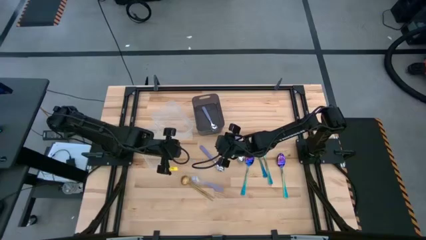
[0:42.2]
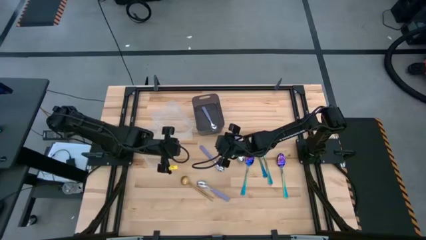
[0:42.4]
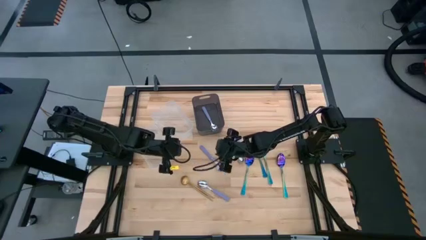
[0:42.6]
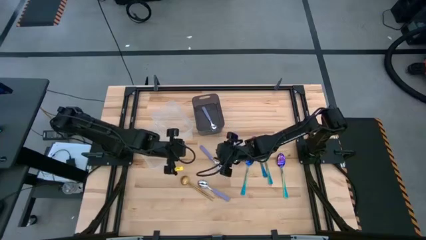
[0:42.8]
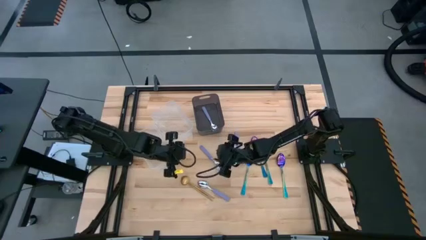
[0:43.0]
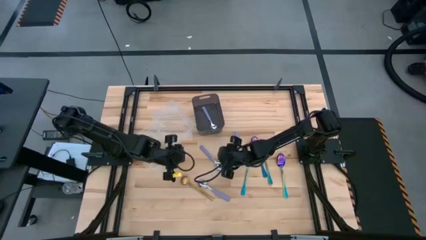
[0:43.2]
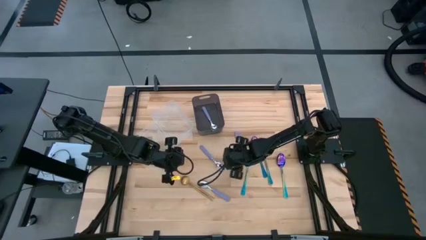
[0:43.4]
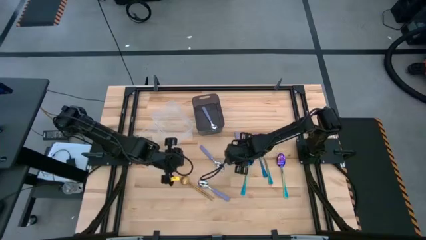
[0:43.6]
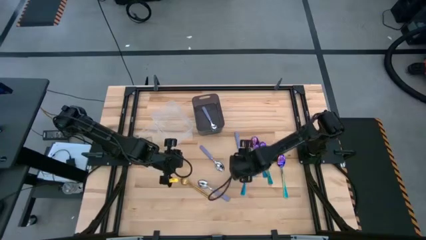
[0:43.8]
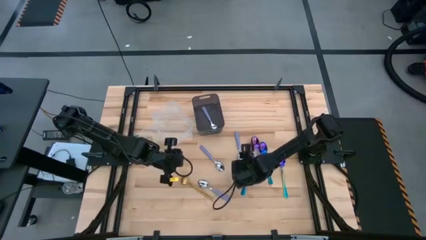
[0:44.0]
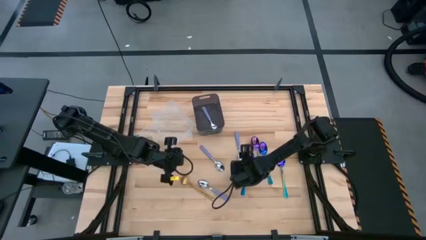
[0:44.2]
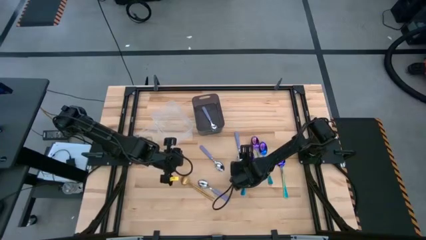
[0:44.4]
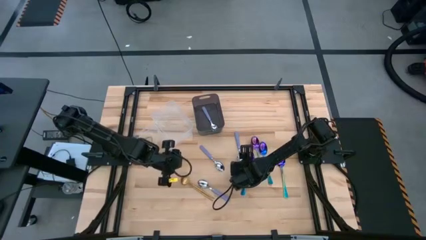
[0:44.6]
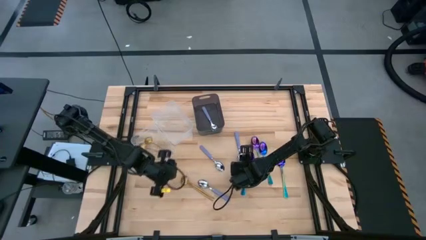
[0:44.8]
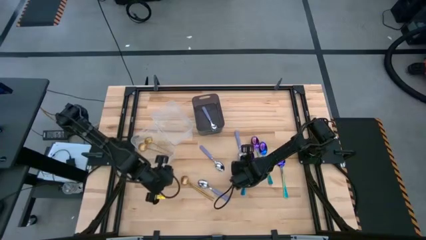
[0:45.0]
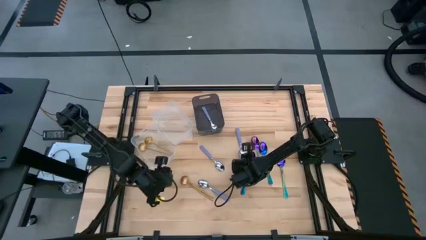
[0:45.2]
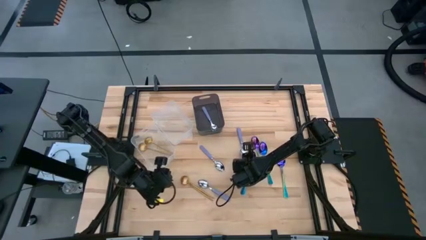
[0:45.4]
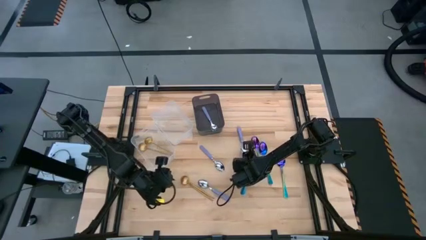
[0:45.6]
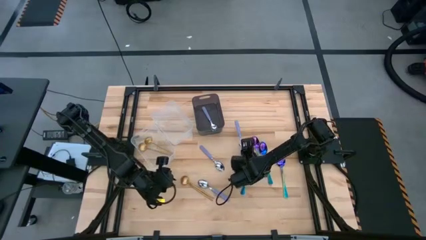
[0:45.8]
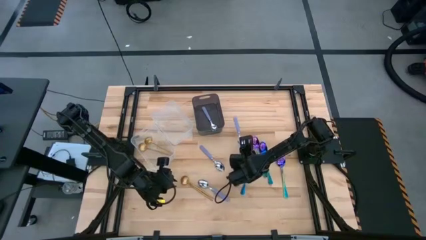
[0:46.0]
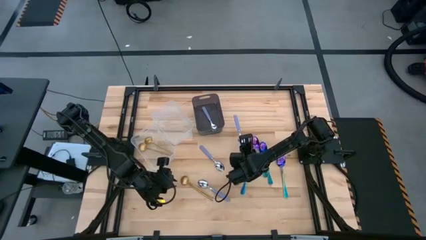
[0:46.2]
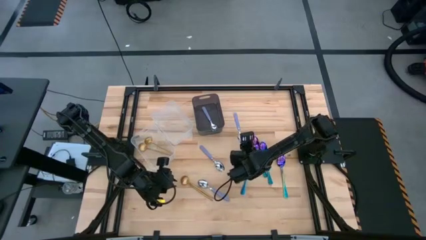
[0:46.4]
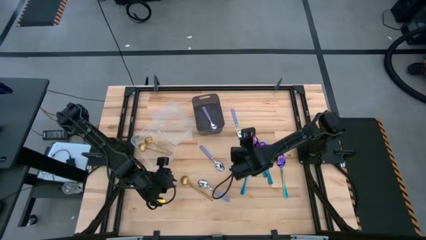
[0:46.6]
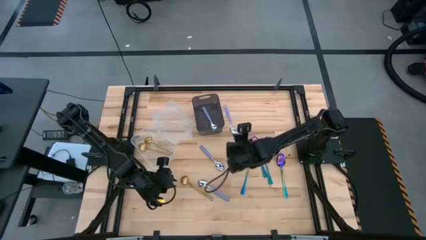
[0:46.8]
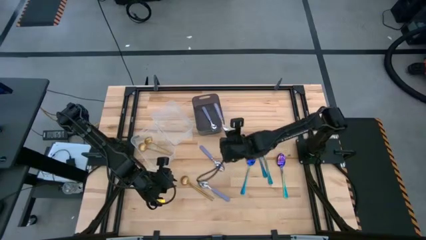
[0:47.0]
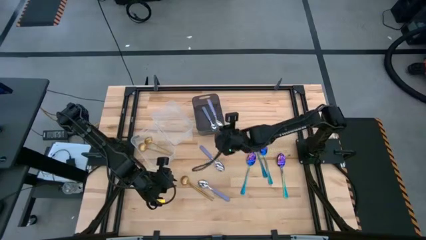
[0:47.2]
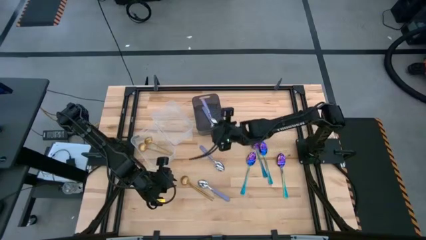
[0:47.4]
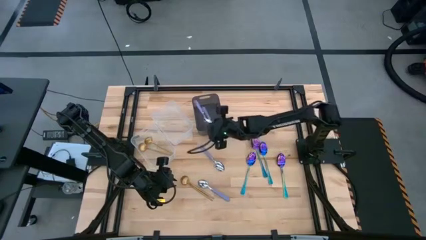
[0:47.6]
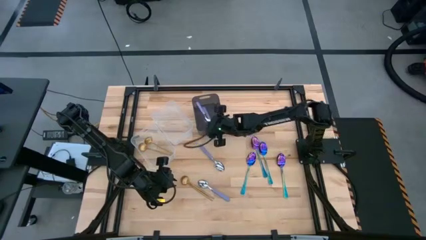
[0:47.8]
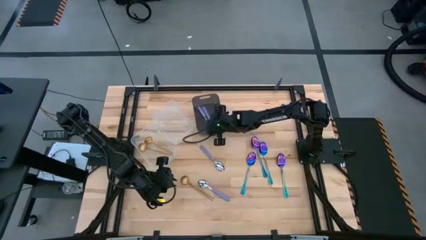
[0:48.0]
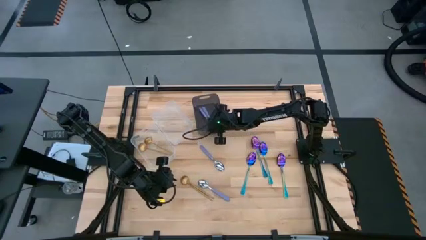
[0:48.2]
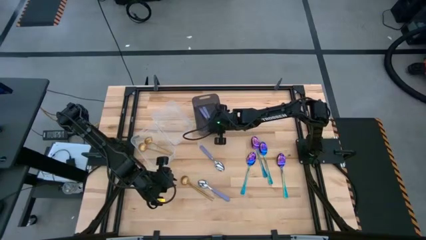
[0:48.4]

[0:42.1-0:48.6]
Task: Sort silverware by color (type)
Put the purple spoon into the black transparent bin

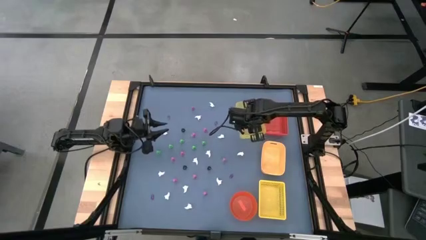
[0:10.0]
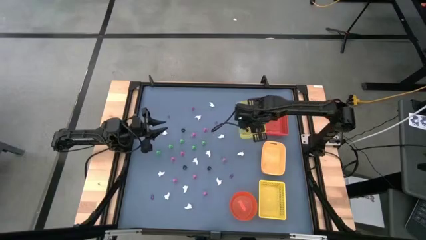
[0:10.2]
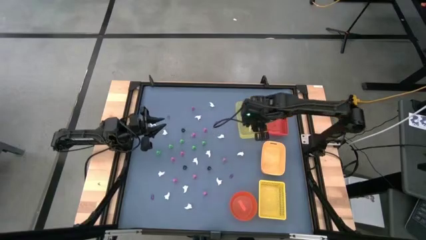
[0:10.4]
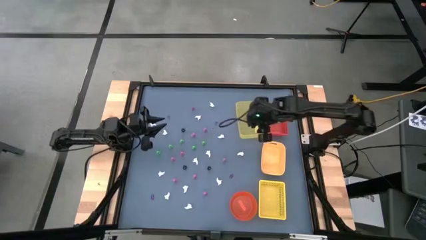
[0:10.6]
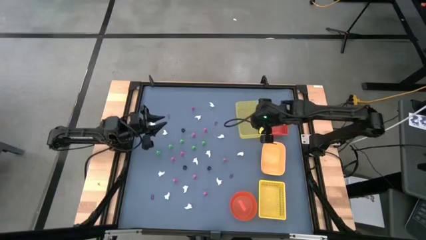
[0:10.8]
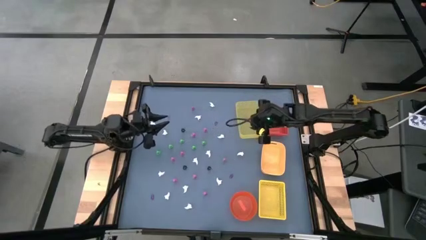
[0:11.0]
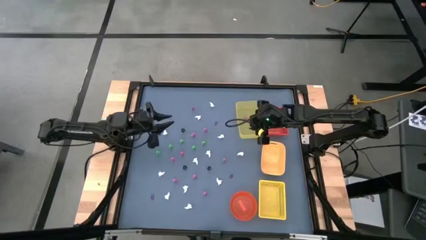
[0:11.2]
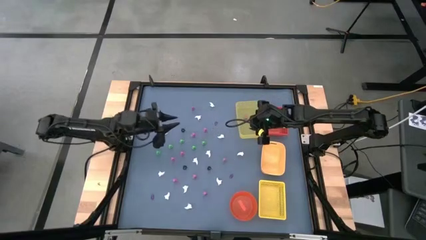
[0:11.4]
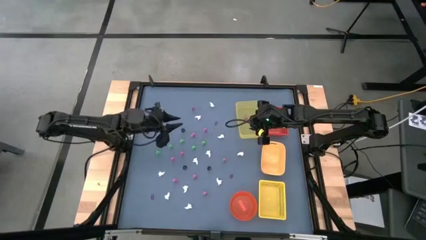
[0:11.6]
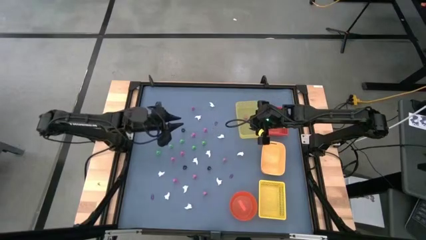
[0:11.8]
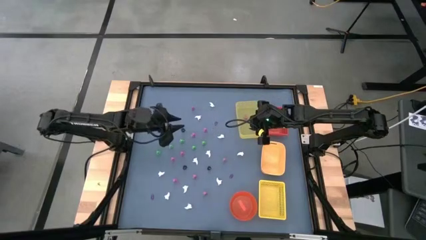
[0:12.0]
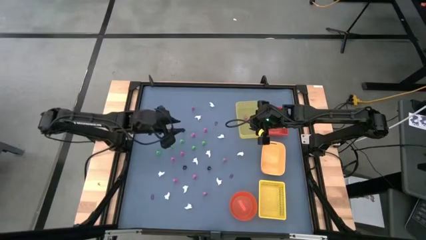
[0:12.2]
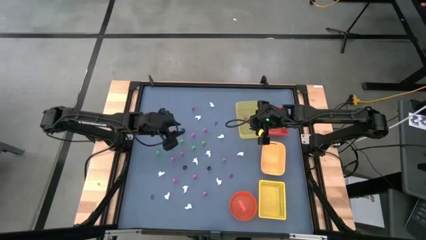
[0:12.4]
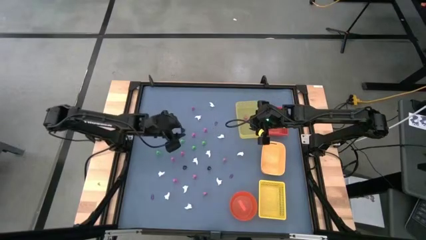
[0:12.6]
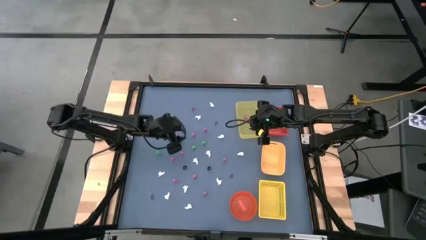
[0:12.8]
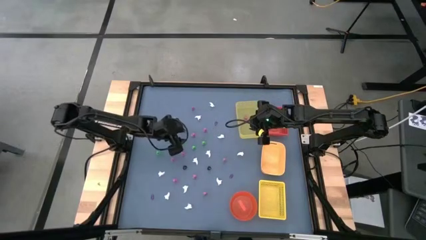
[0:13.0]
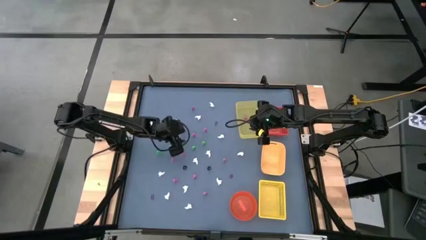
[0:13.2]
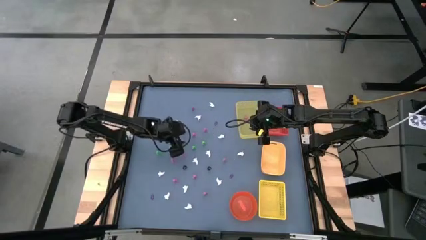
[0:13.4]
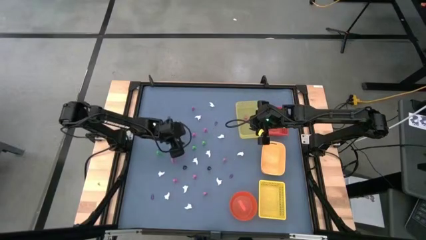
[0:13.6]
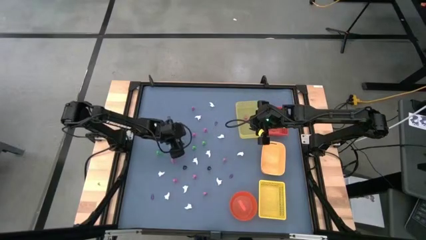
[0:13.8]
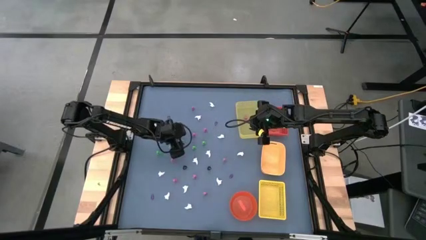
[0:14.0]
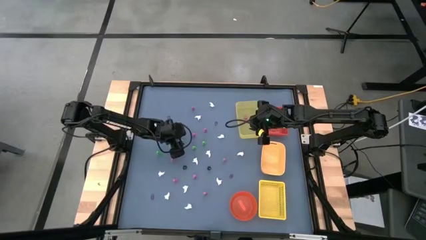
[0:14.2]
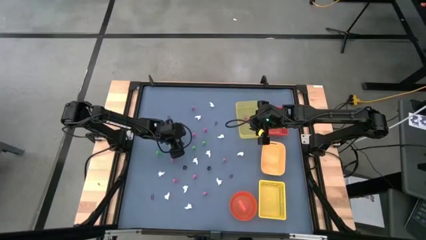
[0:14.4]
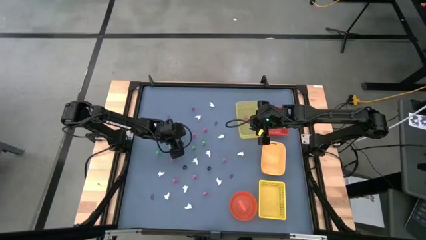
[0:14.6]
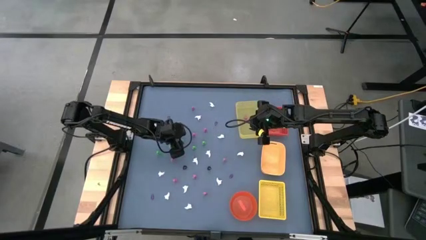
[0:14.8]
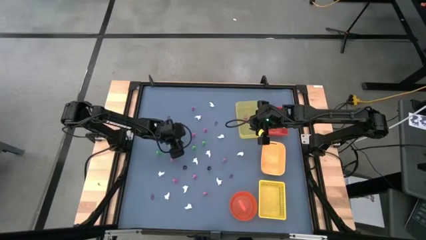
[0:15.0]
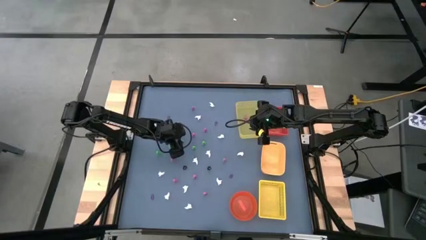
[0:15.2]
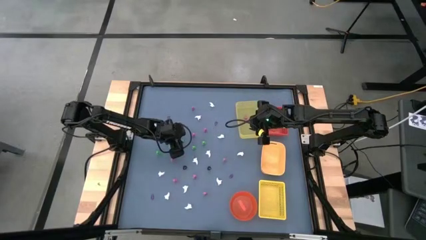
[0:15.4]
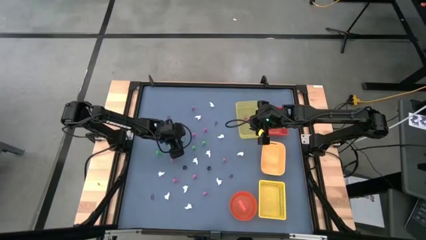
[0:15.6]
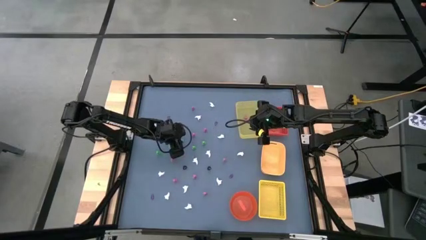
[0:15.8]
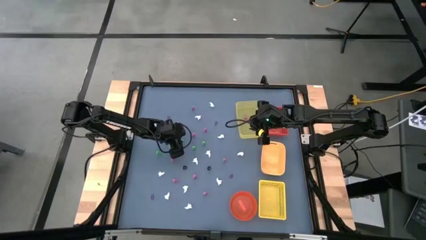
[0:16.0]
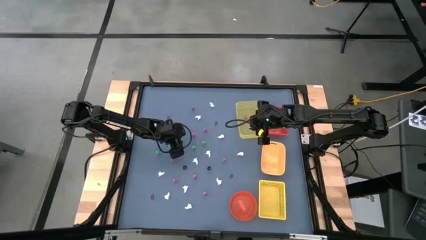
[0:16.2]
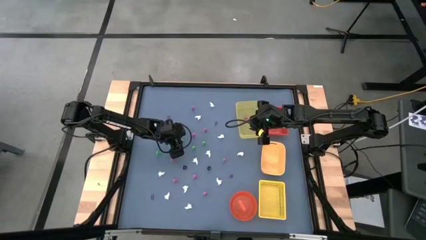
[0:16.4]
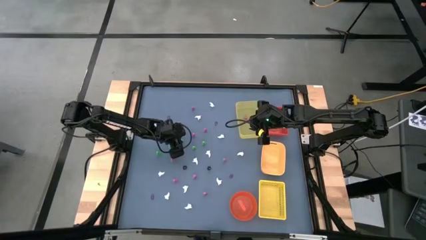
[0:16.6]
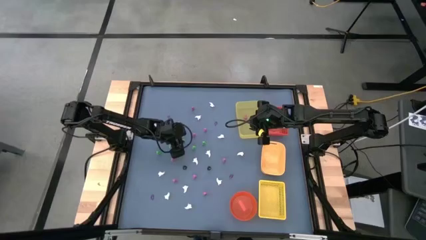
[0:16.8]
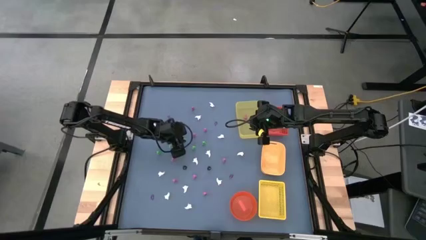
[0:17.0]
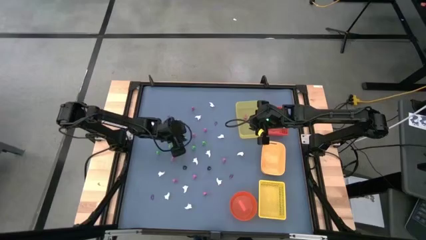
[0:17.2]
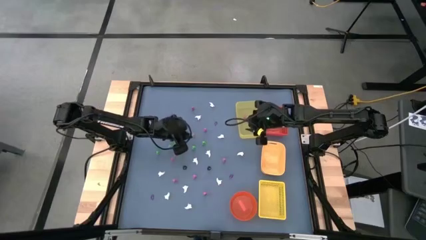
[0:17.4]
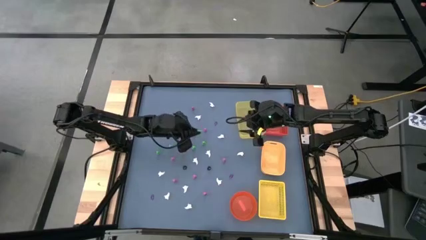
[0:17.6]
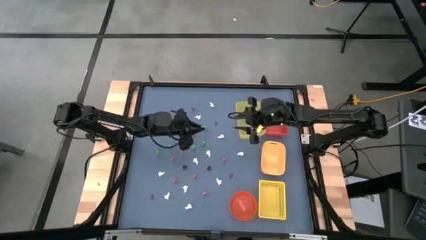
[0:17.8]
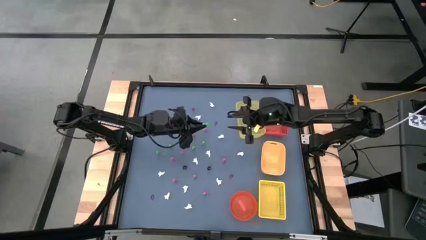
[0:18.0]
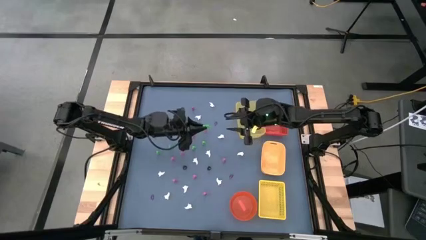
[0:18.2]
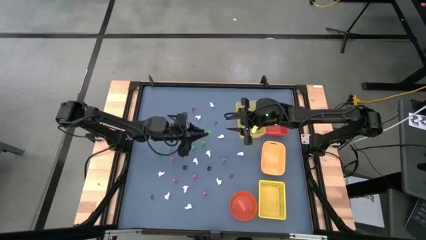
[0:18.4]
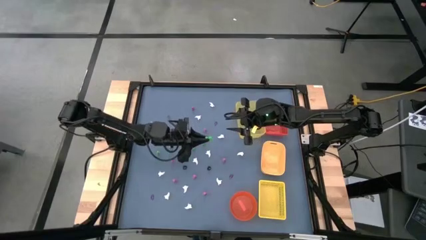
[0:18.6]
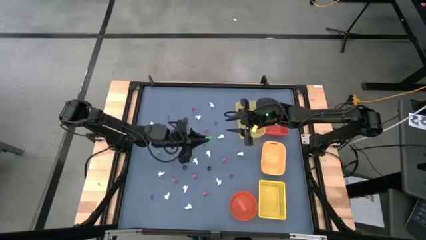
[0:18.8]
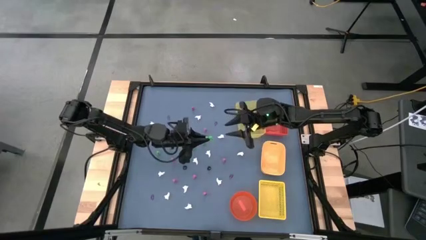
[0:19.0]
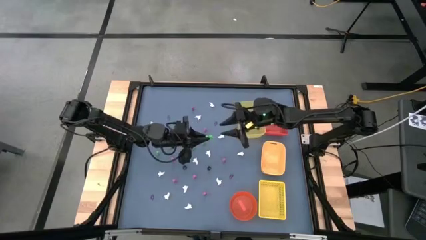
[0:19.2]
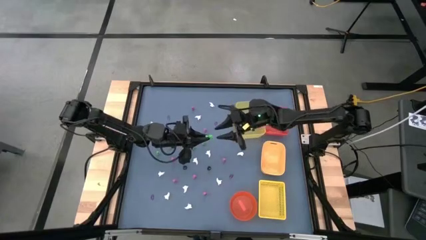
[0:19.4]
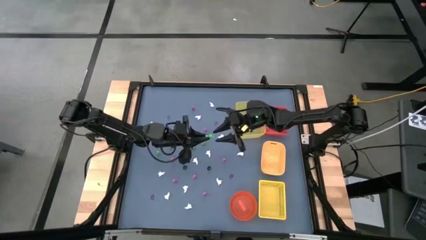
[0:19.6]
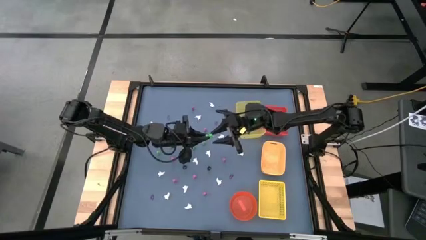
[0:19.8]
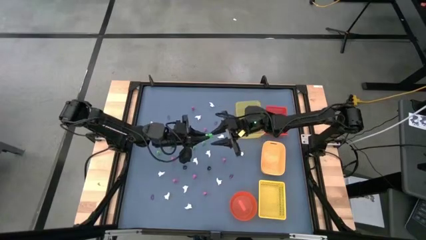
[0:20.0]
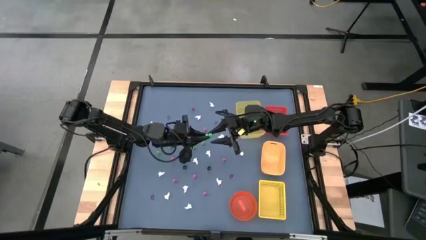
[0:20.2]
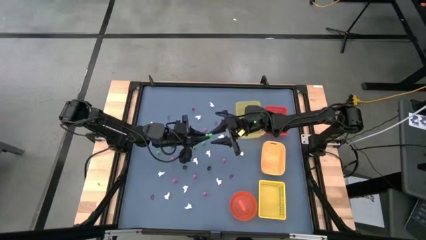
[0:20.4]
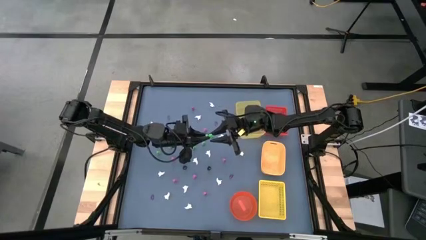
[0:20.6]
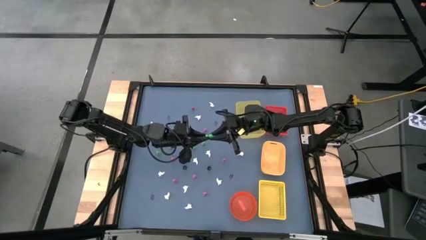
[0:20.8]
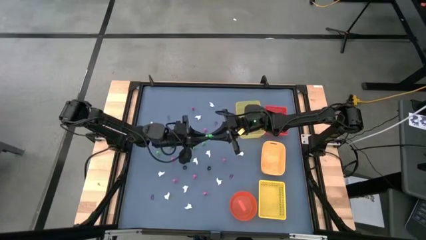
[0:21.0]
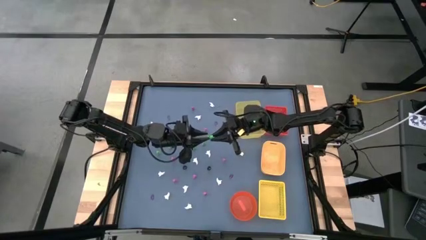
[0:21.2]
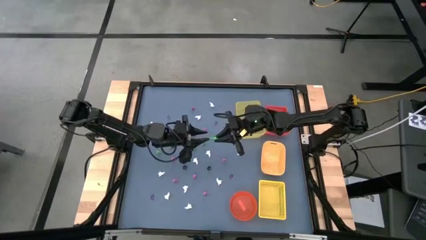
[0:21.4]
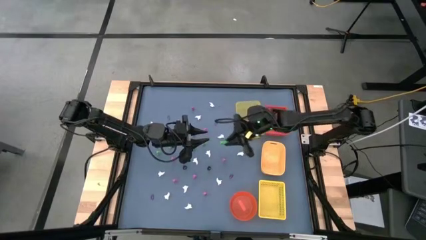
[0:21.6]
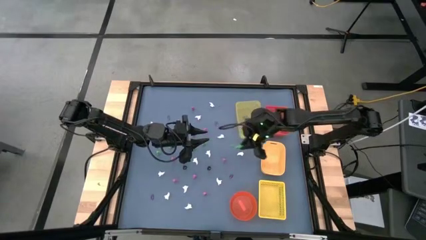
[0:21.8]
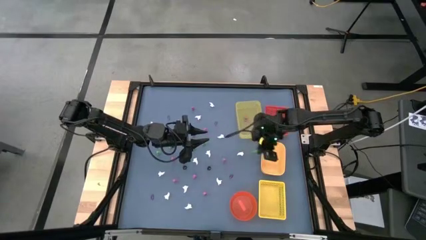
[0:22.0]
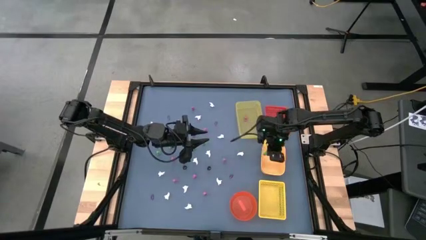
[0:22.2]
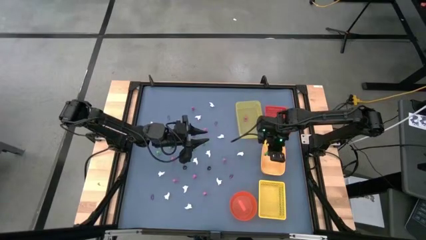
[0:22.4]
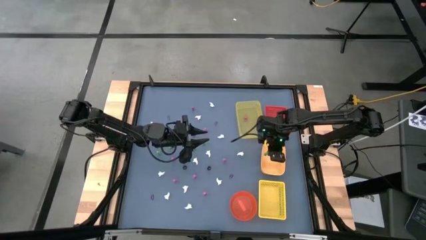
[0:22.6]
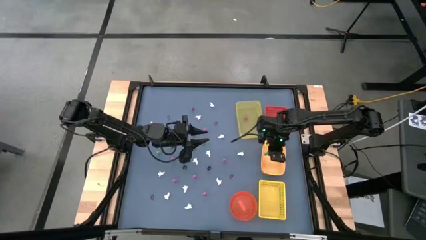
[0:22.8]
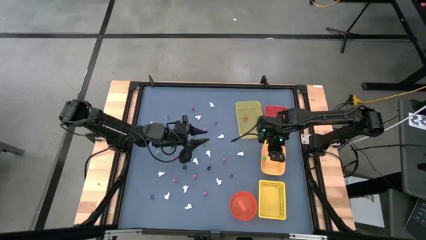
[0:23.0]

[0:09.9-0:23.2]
Task: Sort Halloween decoration
Put the green skeleton toy into the middle yellow bin
